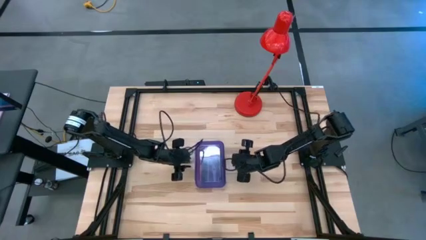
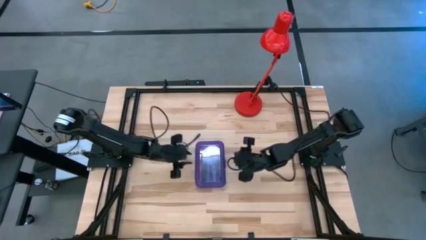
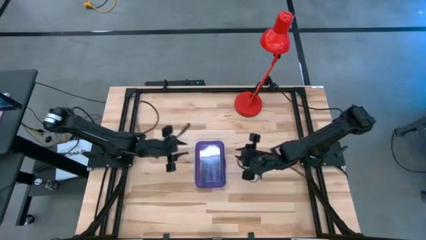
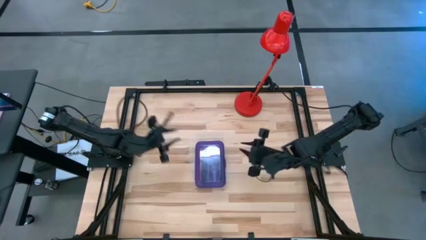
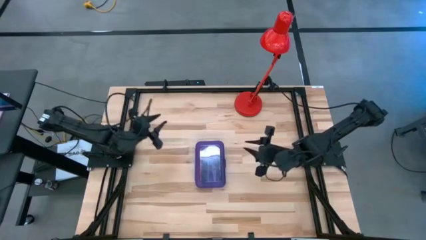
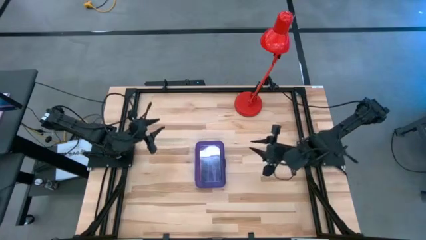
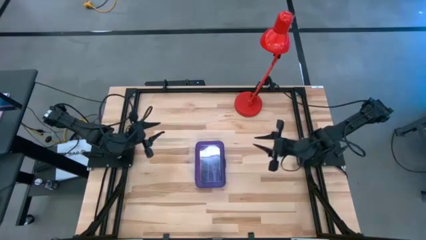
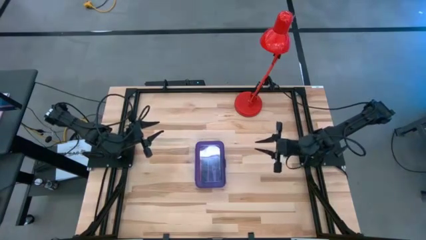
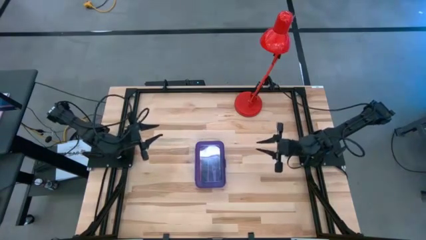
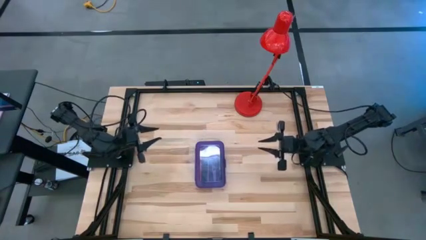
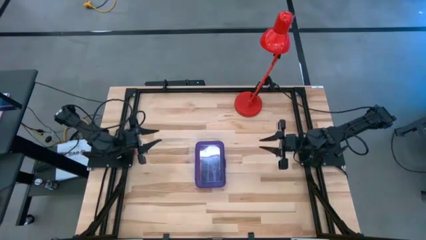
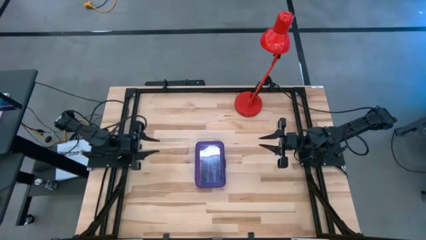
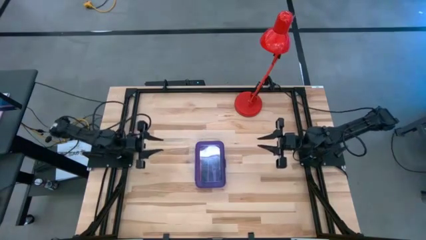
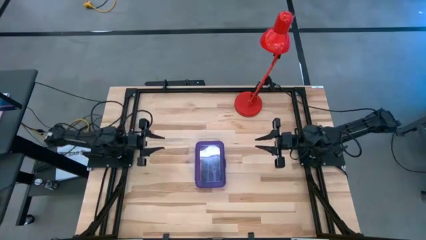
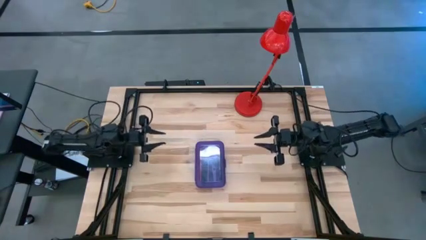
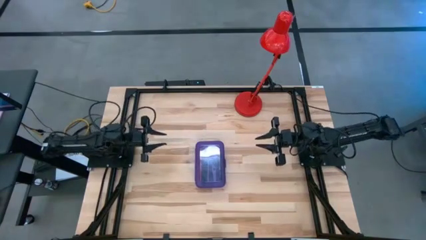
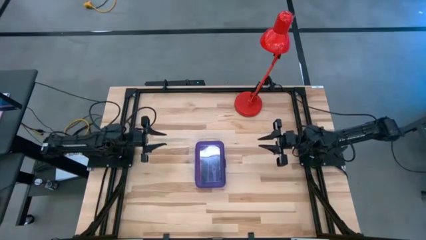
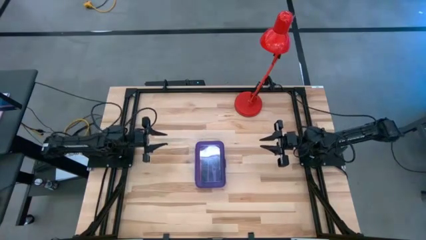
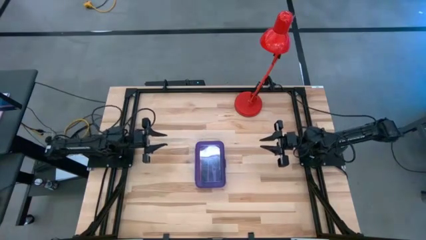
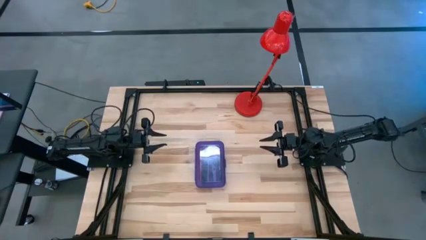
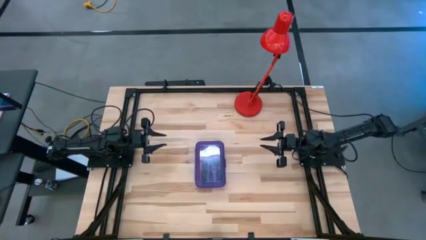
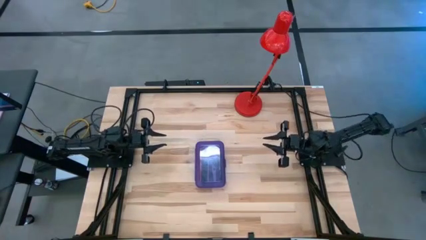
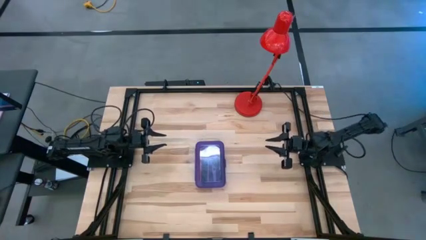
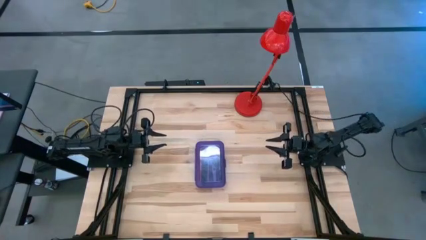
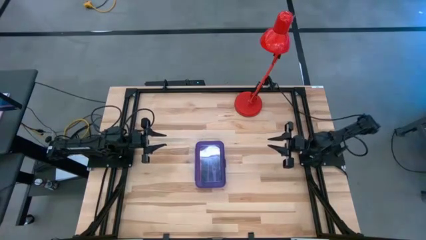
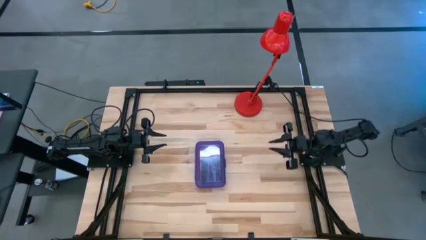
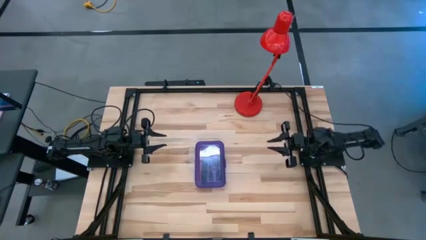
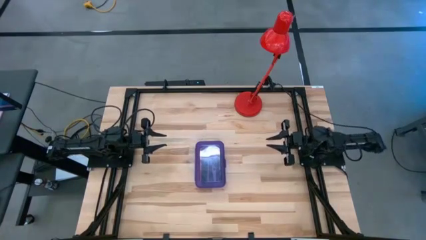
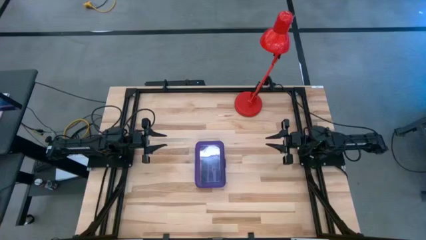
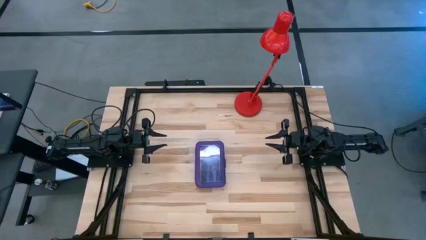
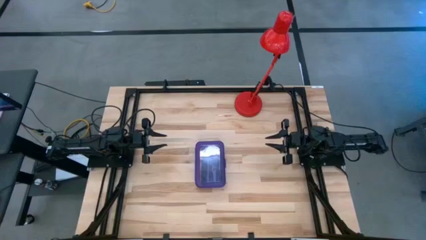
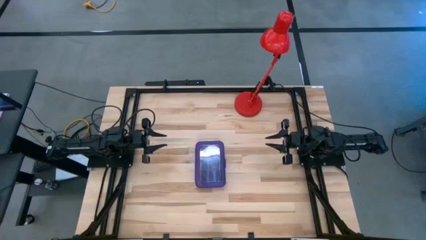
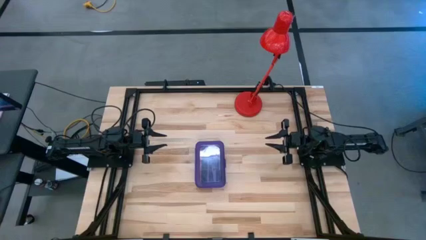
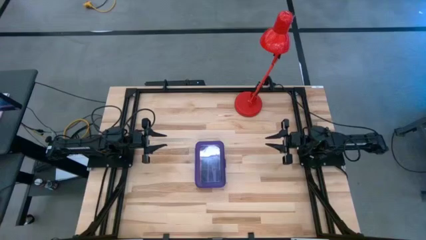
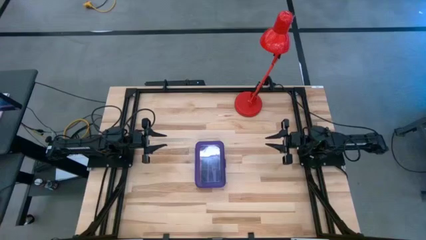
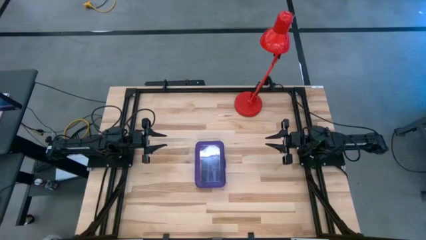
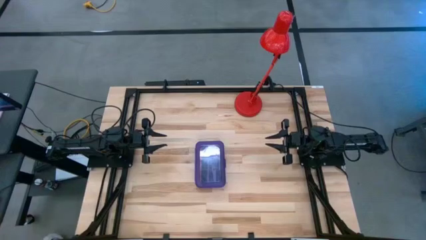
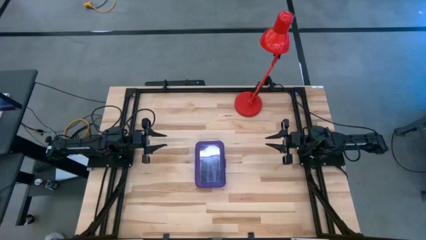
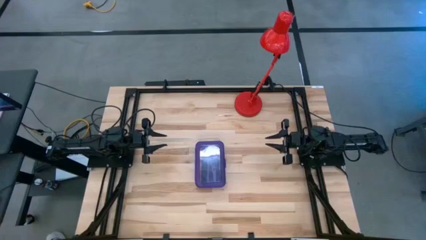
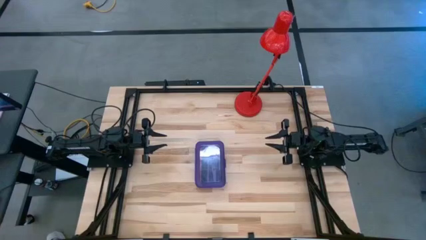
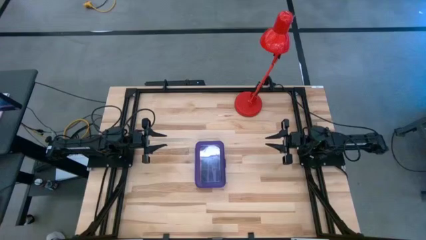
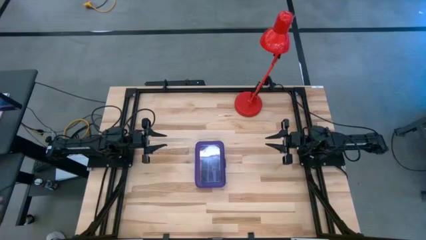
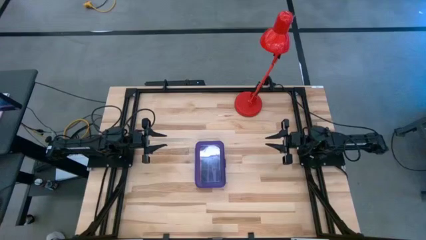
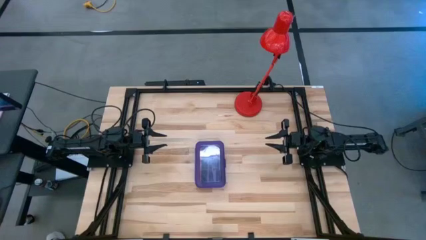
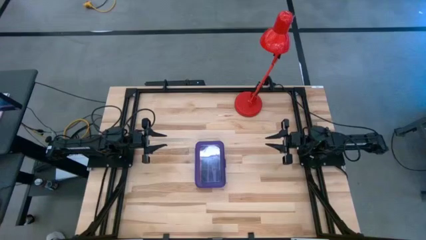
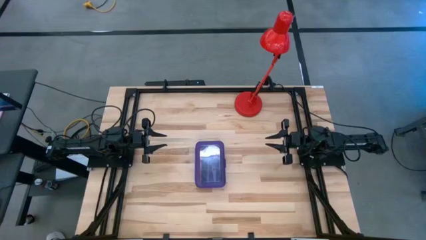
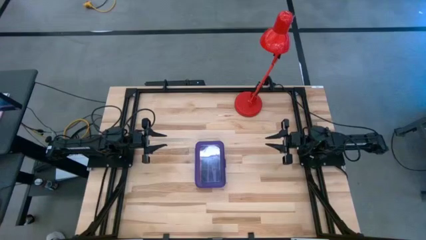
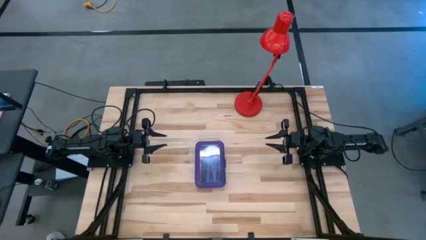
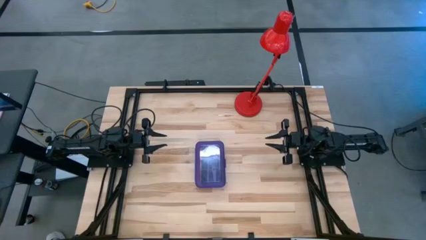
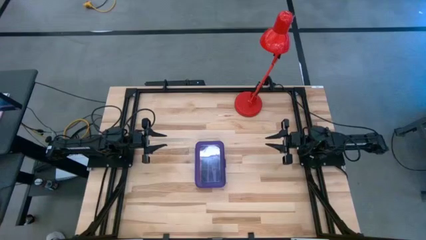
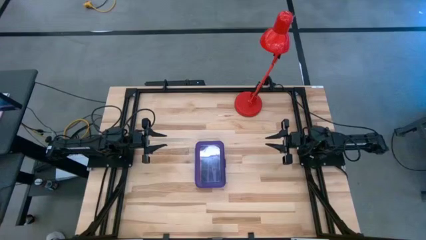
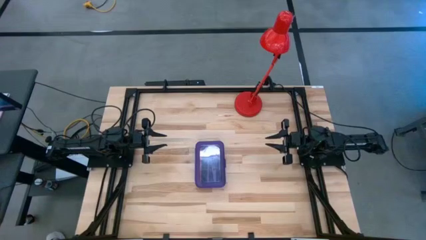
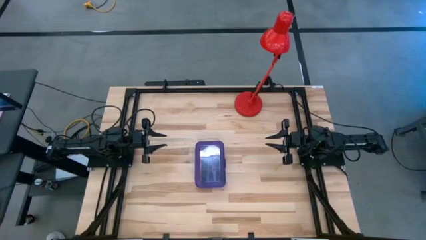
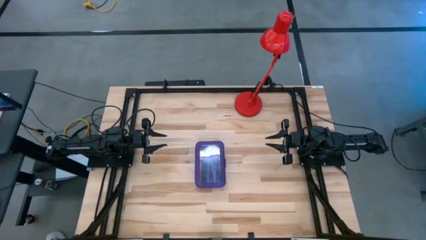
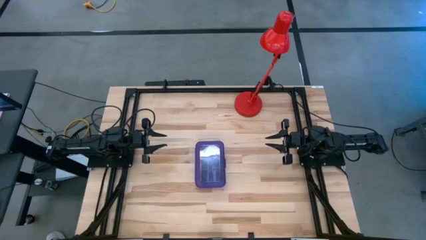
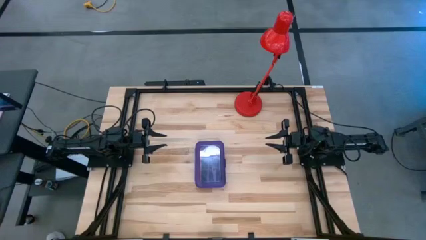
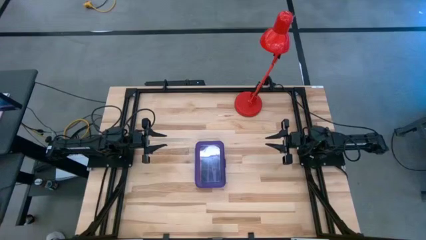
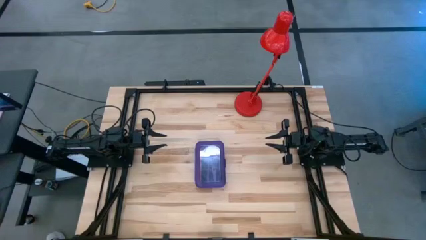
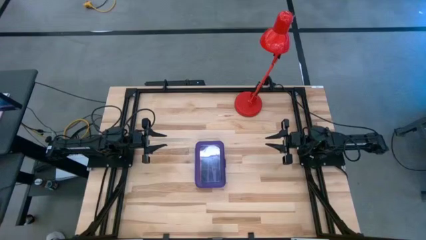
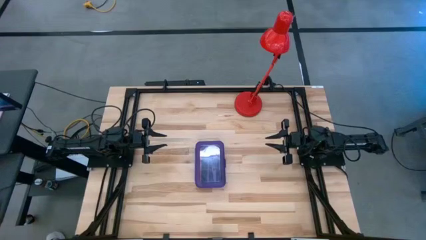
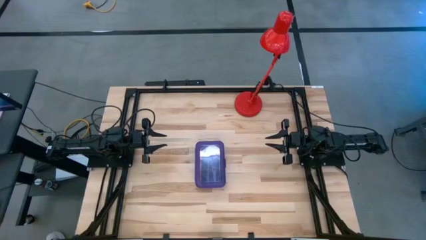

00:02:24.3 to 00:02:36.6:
Task: Pick & place school supplies into a supply box
Return to Home Position
